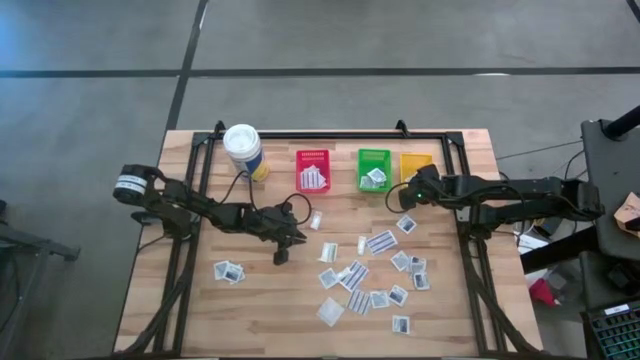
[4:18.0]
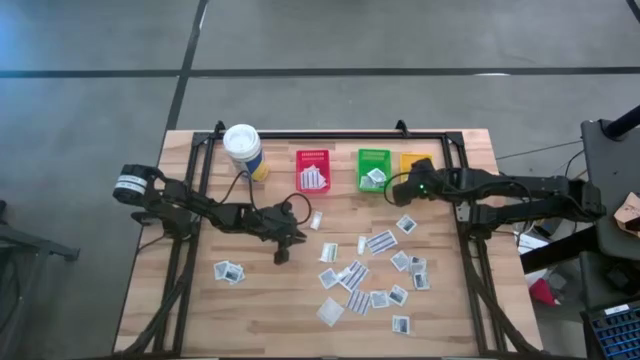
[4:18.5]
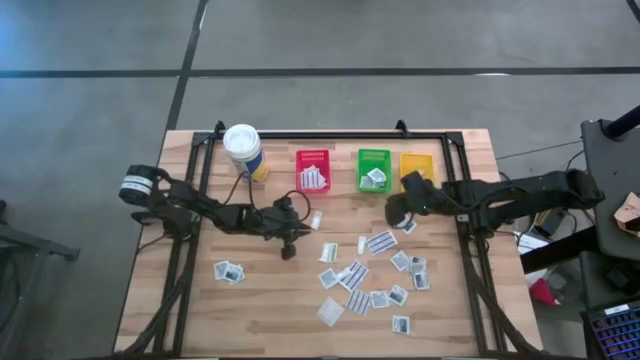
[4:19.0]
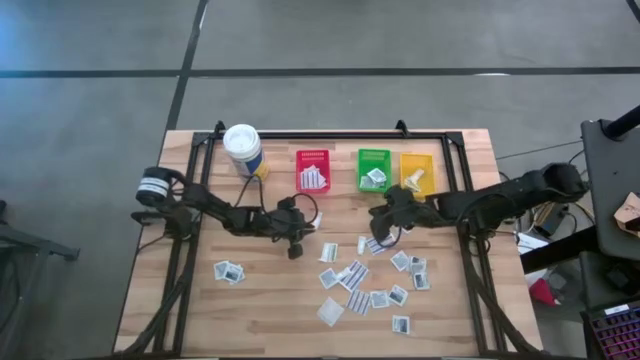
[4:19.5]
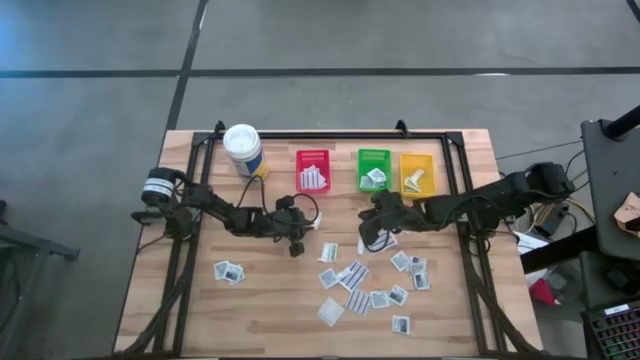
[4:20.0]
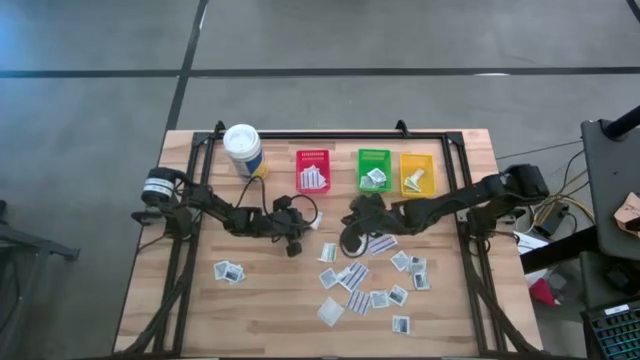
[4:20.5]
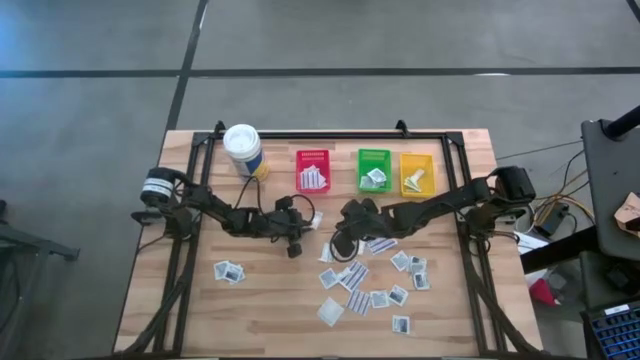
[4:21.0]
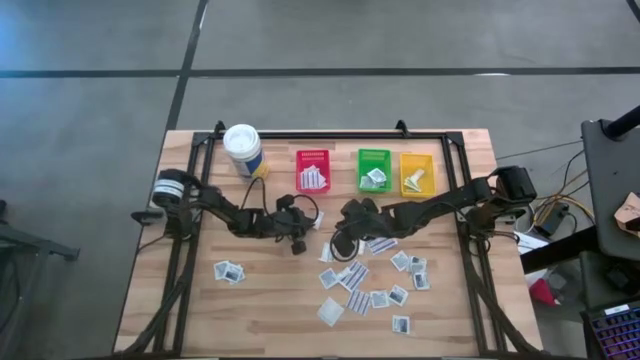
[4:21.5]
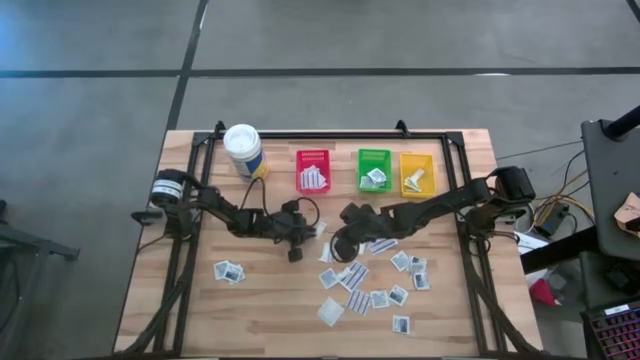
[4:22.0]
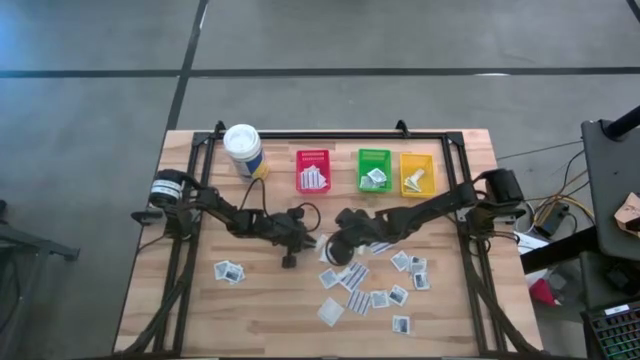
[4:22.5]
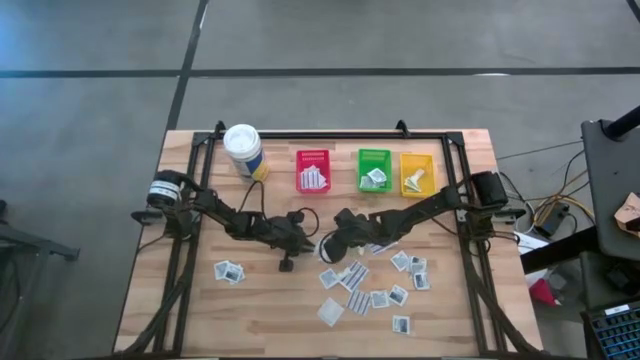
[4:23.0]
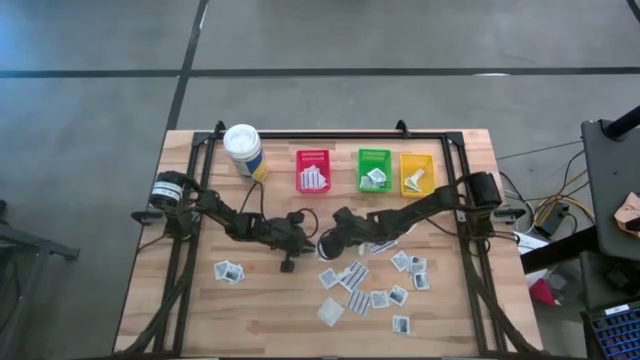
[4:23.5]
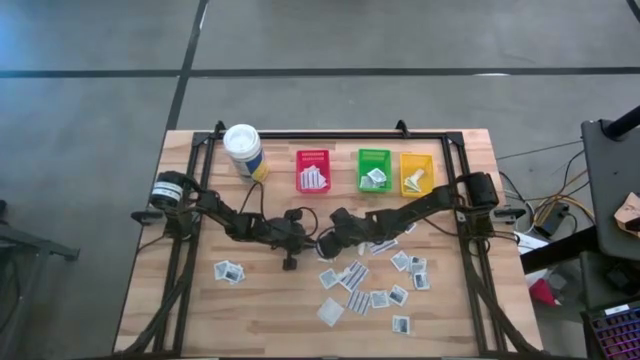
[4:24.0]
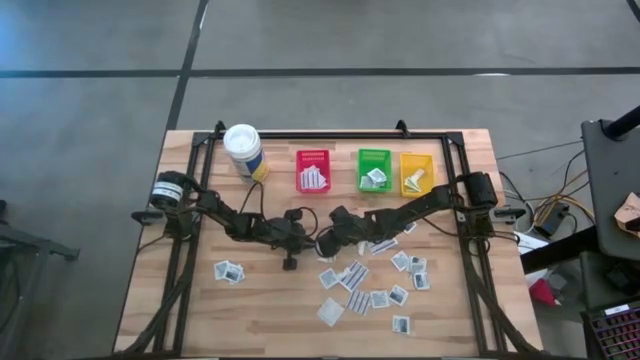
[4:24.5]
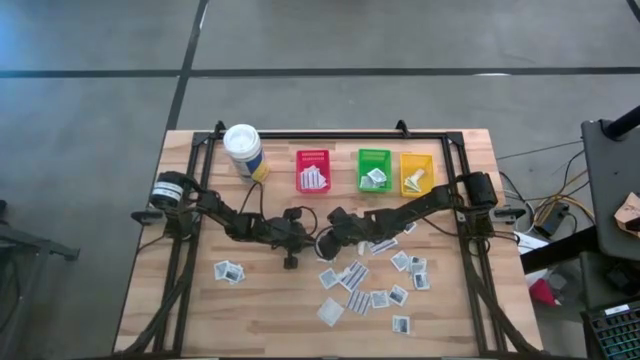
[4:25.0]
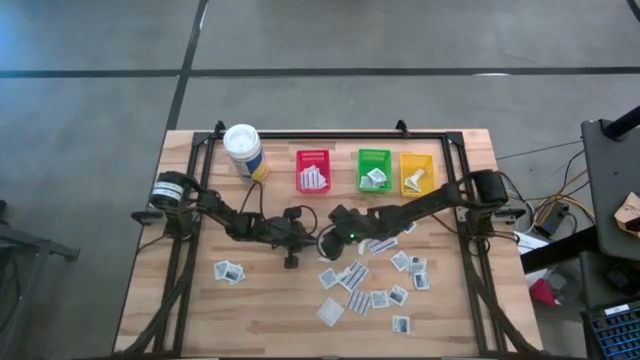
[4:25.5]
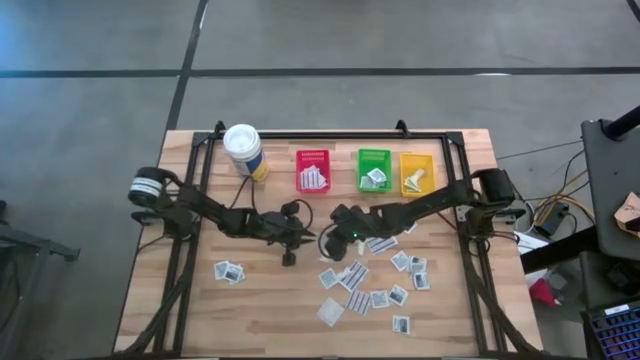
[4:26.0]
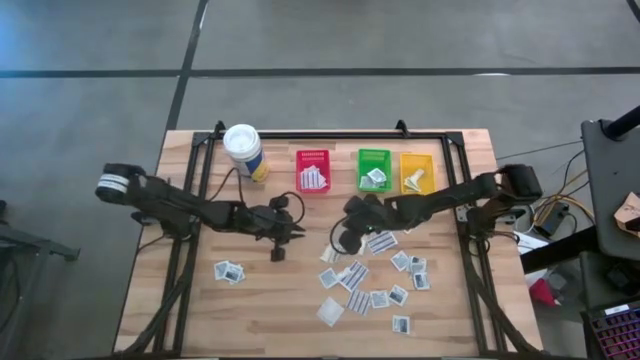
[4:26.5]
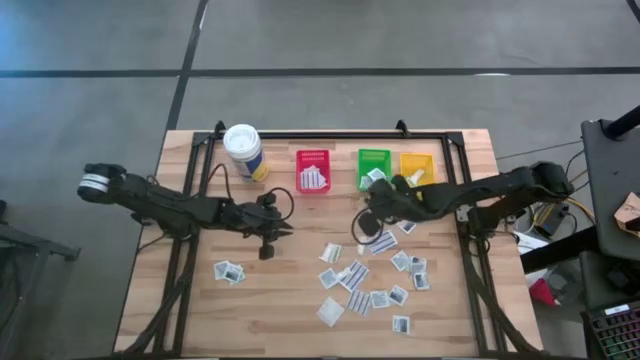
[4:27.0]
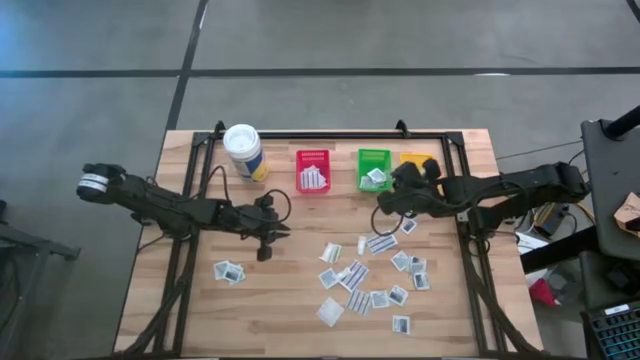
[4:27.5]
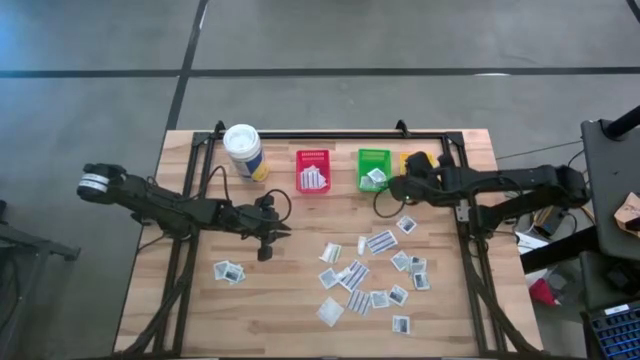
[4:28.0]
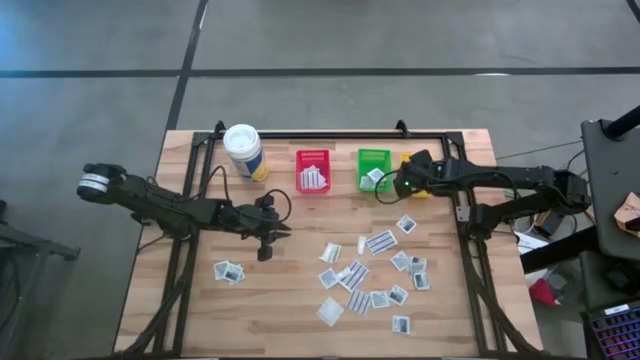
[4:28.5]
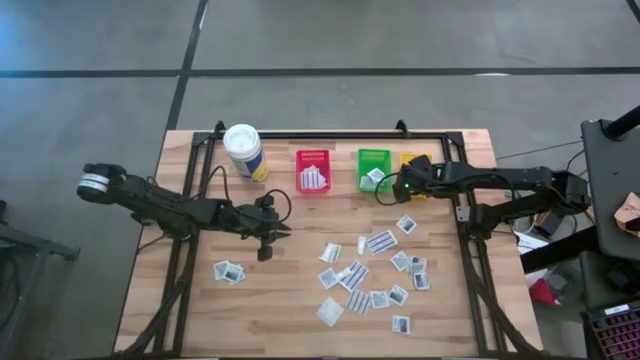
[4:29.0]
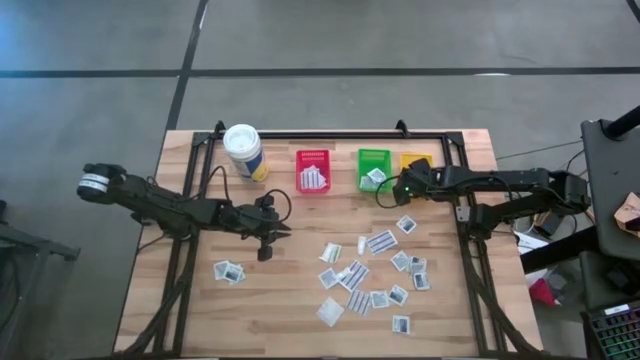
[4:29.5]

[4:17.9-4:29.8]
Task: Pick & Place First Aid Supplies
Put the green bandage in the yellow bin

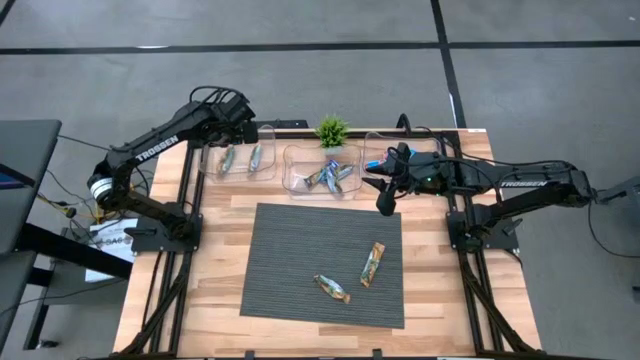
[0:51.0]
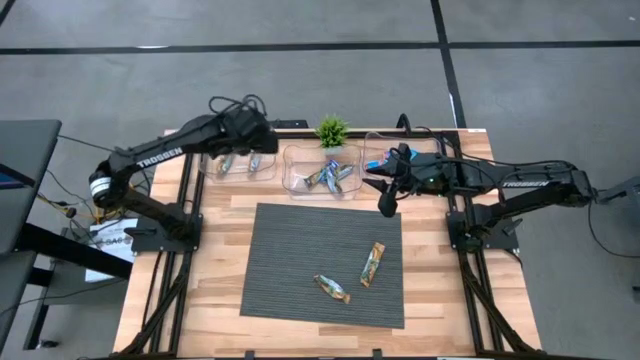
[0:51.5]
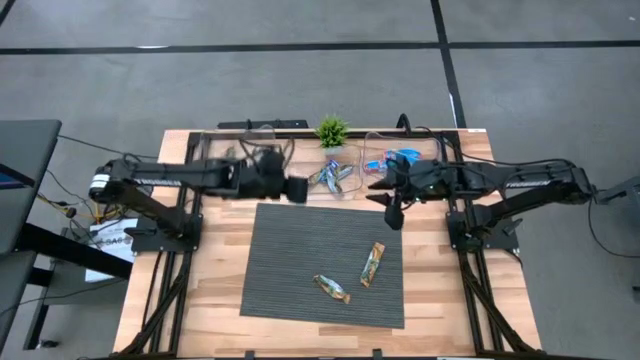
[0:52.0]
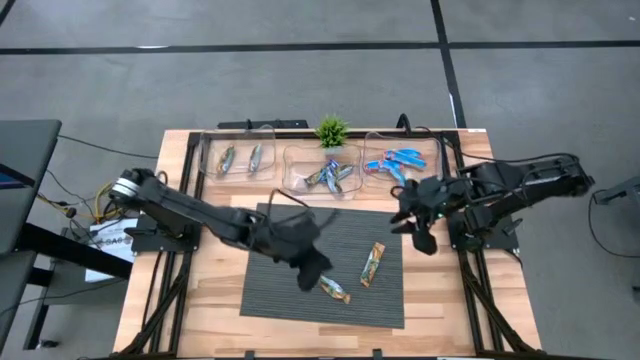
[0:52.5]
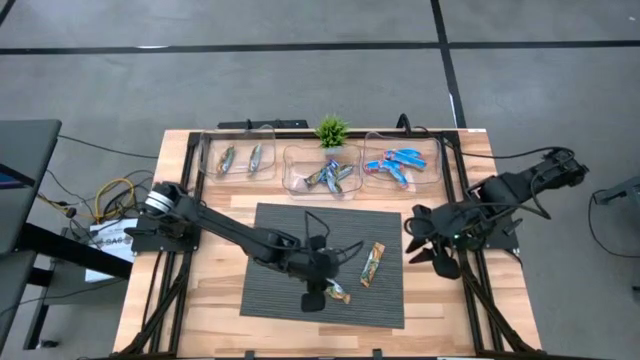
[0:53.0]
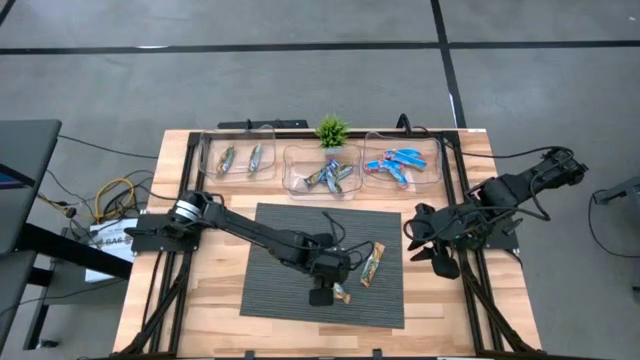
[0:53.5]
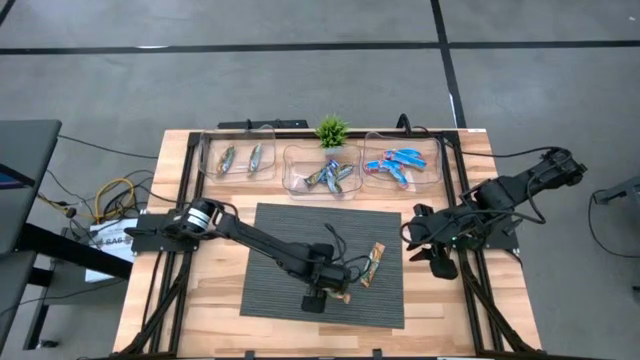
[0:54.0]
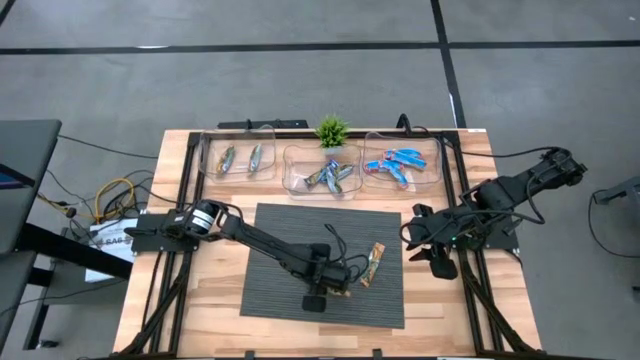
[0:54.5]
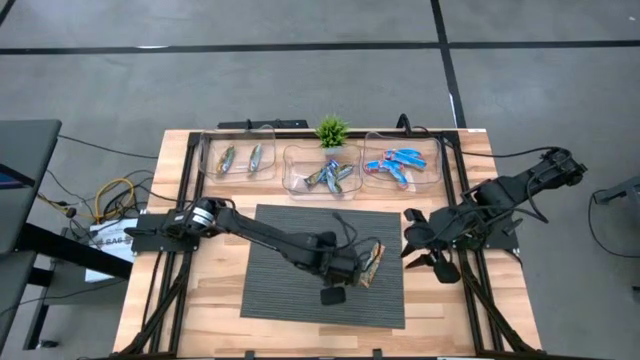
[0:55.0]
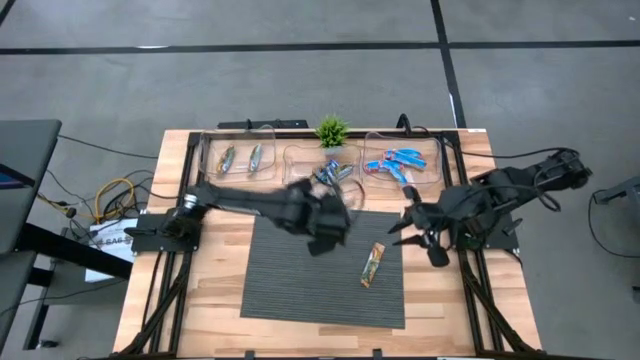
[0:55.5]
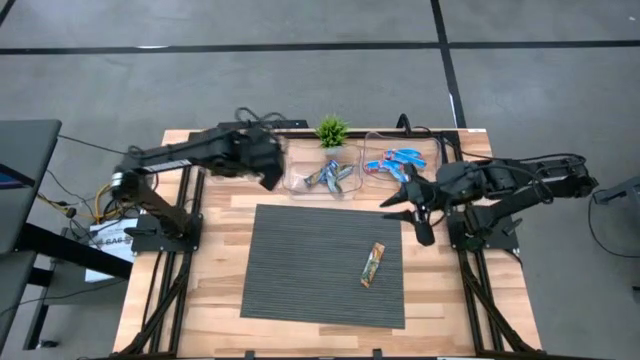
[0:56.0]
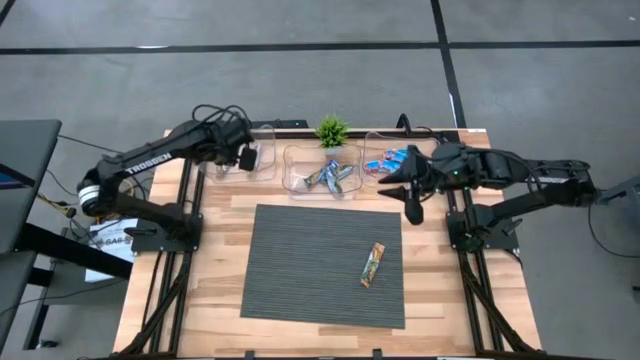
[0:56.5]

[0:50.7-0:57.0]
Task: Pick and place Granola Bars by type
Put the yellow granola bar into the left transparent bin

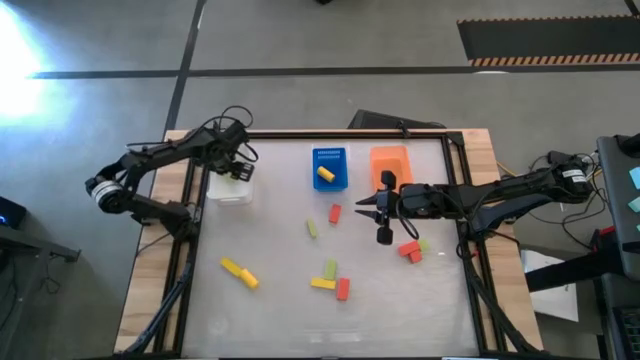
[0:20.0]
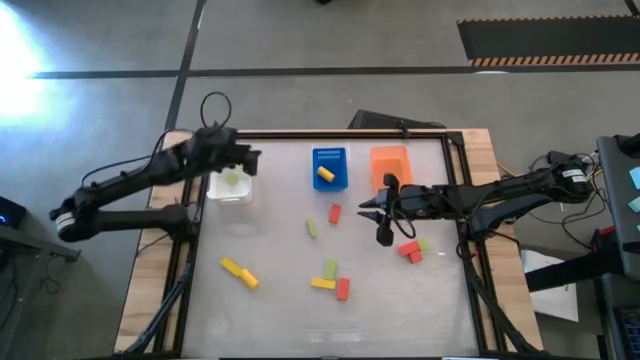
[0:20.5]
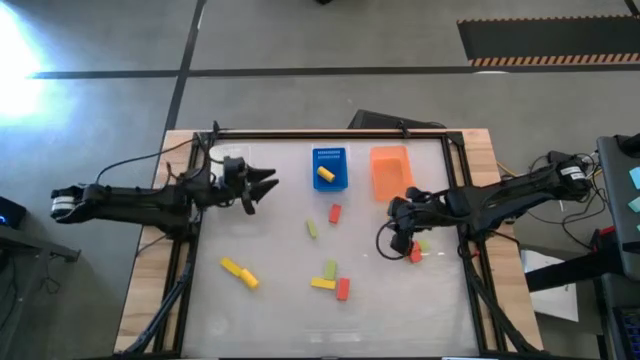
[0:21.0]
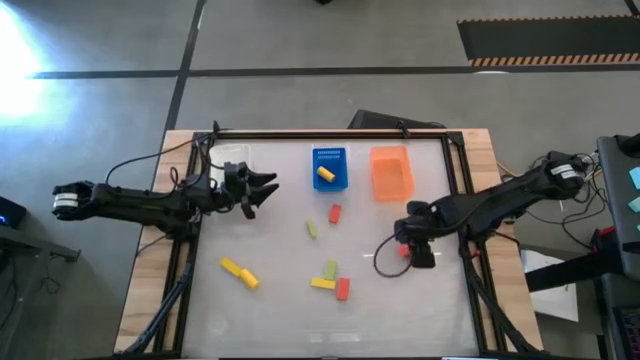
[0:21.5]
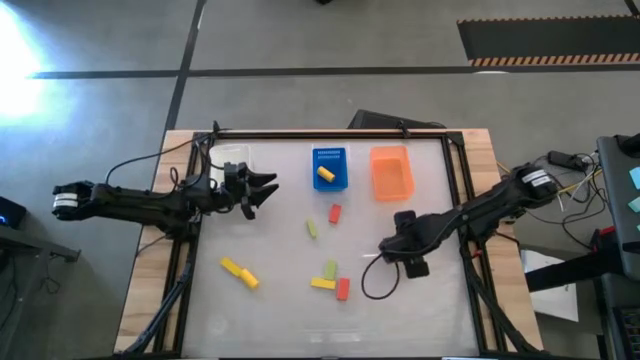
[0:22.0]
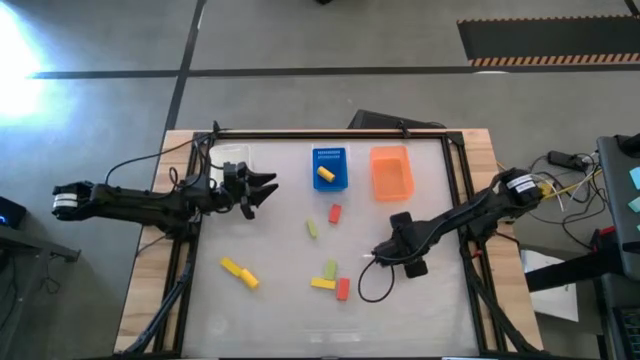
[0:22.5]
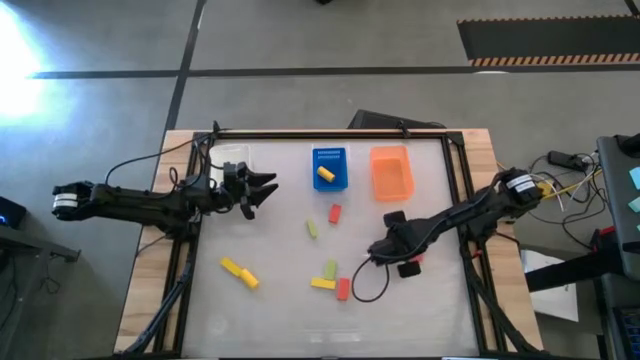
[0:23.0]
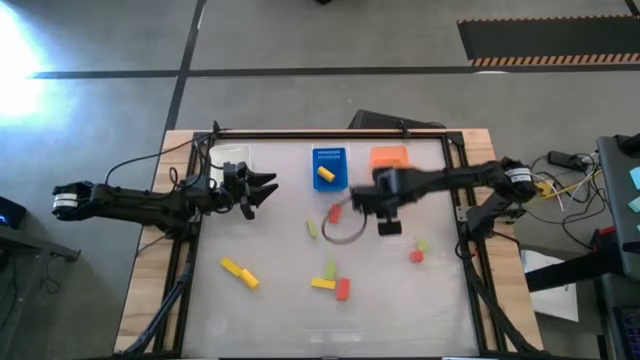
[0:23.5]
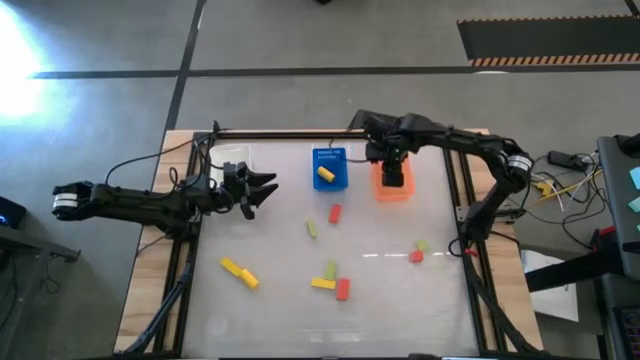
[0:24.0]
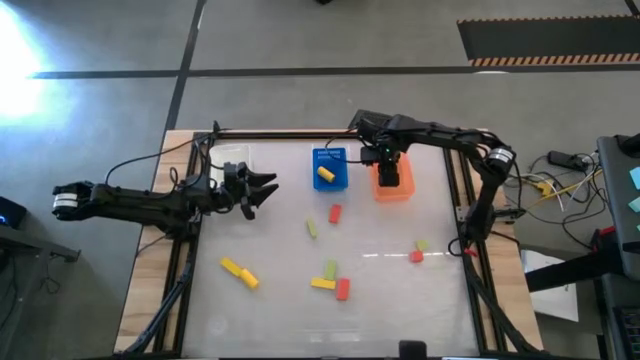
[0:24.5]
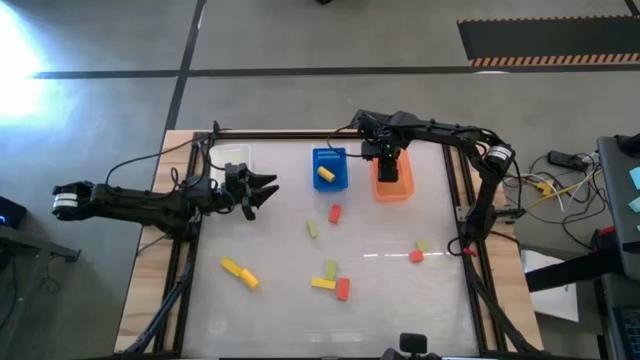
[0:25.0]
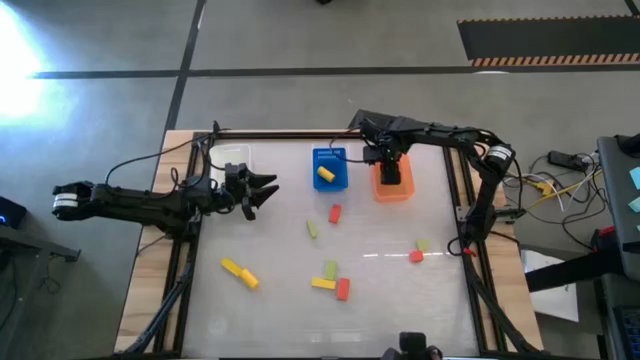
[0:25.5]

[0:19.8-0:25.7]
Task: Sort & place blocks by color
Put the orange block into the orange bin
